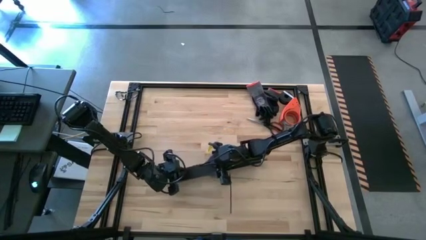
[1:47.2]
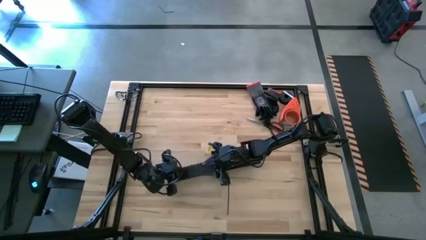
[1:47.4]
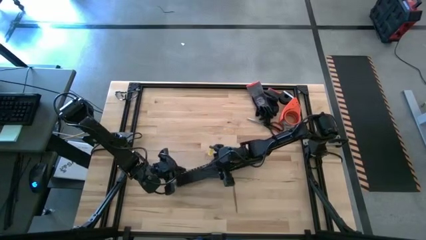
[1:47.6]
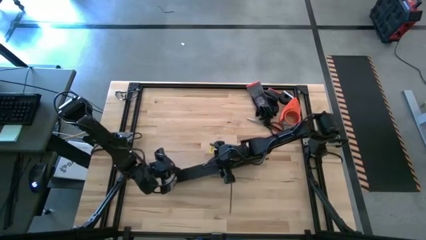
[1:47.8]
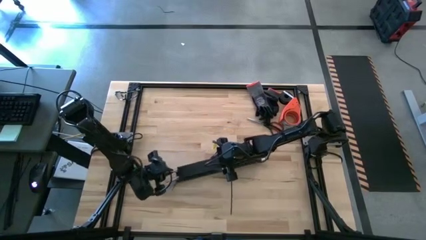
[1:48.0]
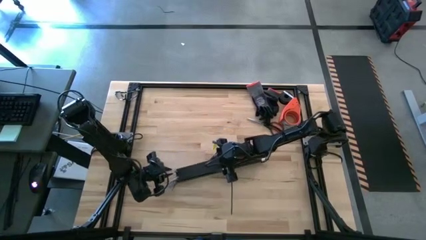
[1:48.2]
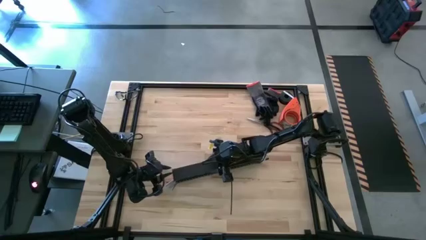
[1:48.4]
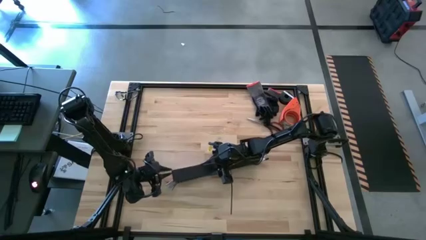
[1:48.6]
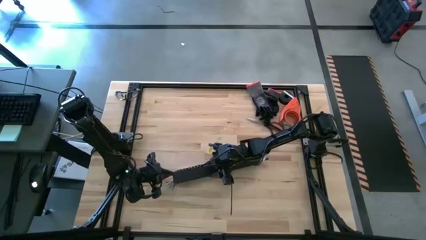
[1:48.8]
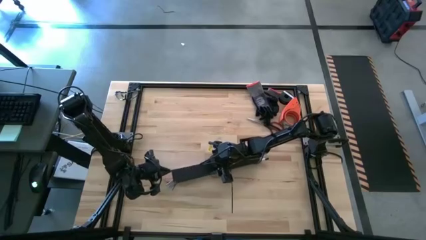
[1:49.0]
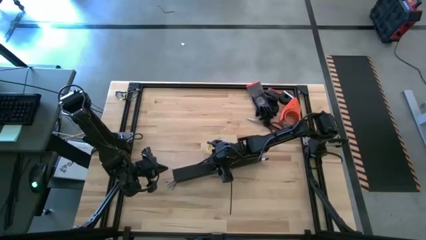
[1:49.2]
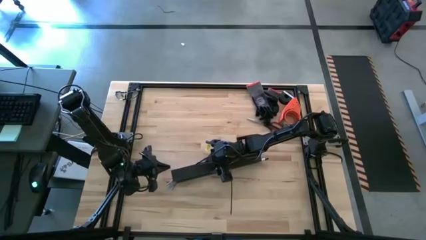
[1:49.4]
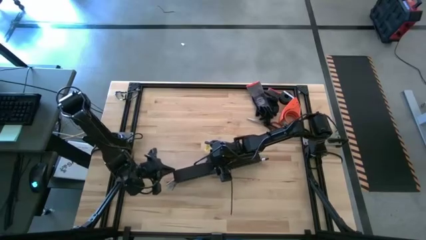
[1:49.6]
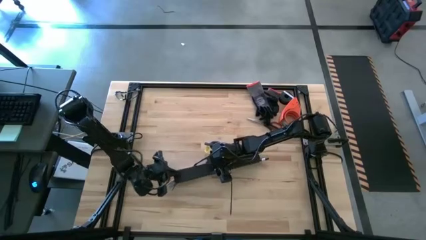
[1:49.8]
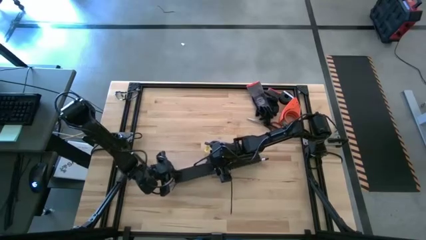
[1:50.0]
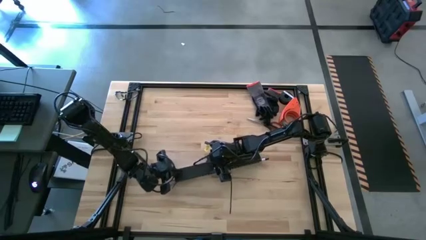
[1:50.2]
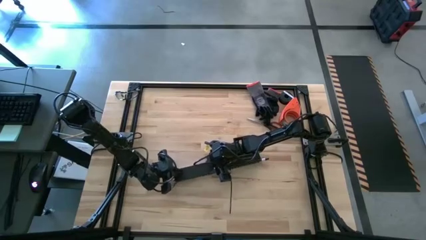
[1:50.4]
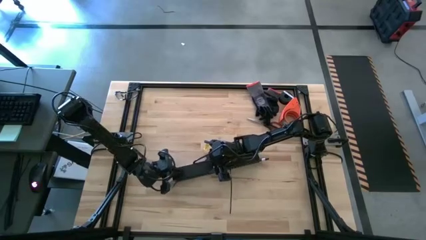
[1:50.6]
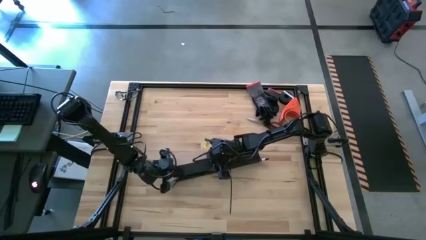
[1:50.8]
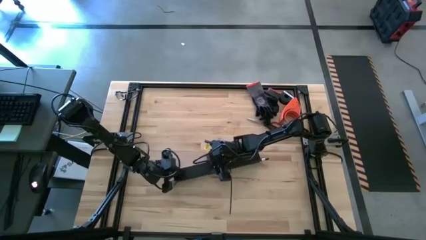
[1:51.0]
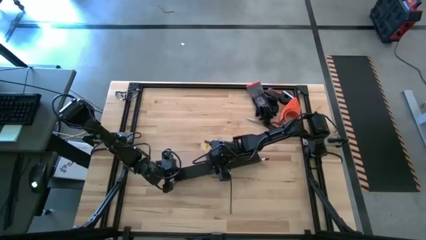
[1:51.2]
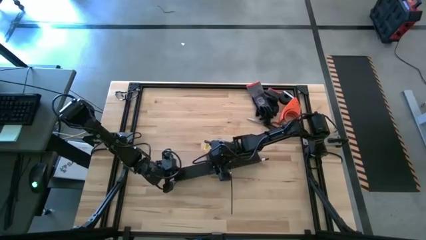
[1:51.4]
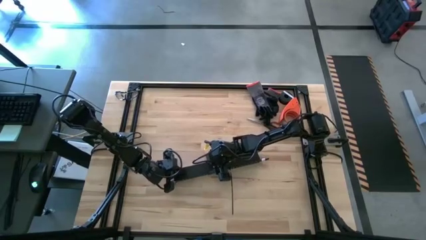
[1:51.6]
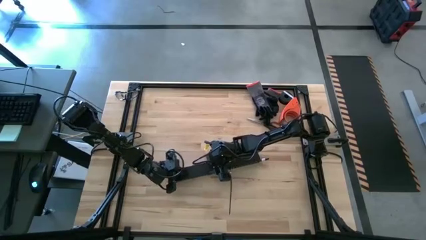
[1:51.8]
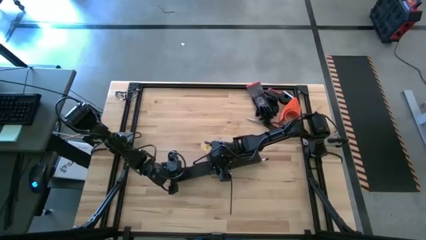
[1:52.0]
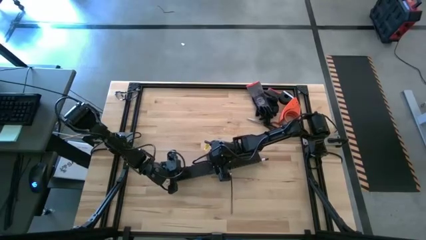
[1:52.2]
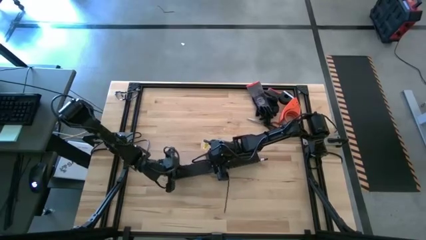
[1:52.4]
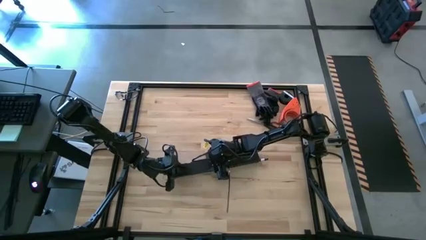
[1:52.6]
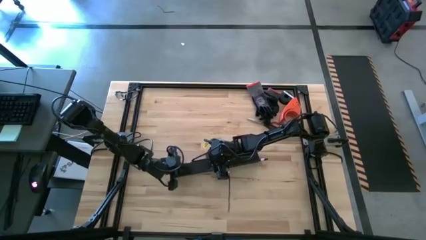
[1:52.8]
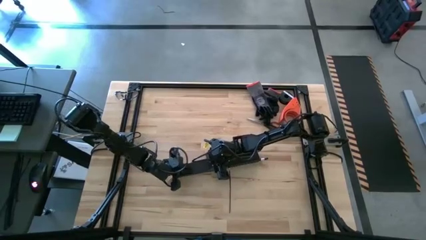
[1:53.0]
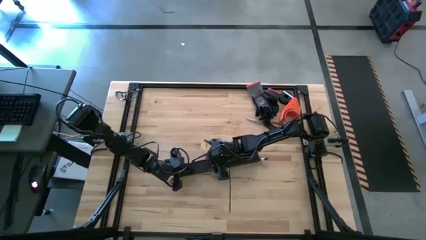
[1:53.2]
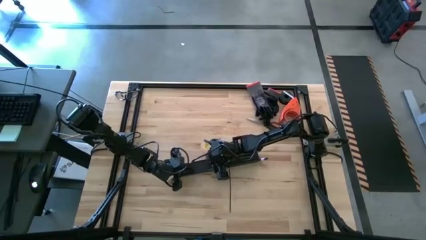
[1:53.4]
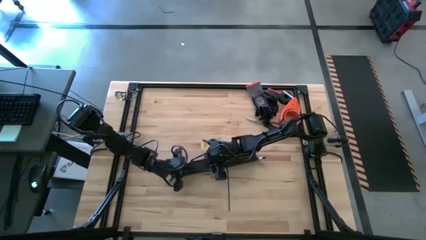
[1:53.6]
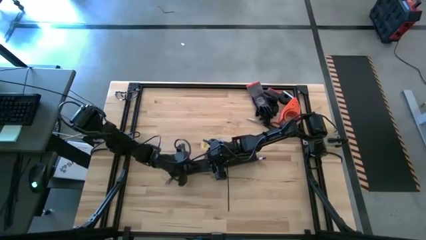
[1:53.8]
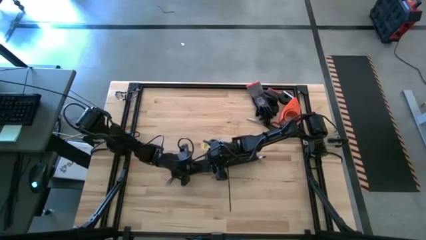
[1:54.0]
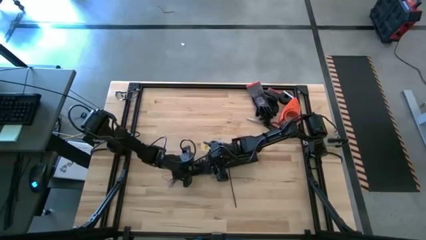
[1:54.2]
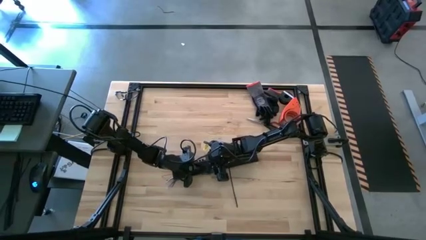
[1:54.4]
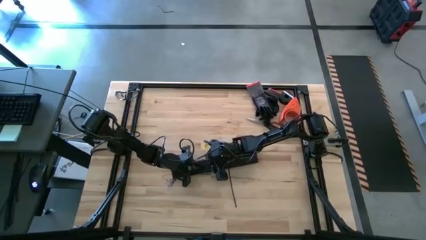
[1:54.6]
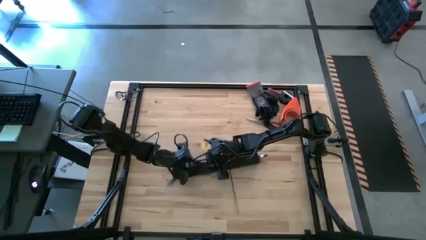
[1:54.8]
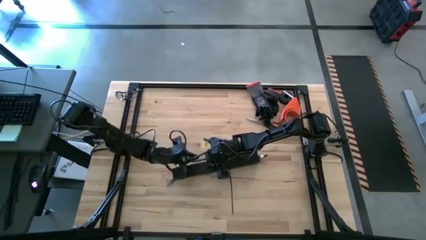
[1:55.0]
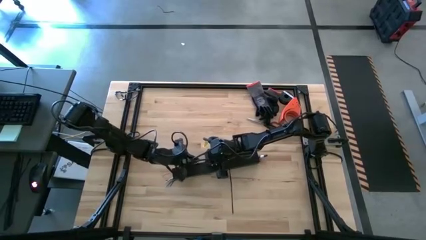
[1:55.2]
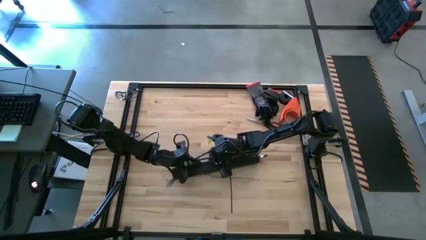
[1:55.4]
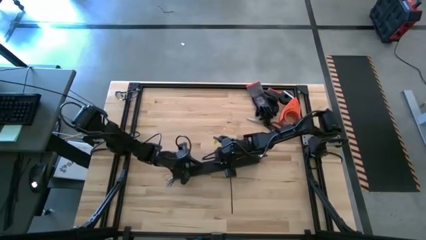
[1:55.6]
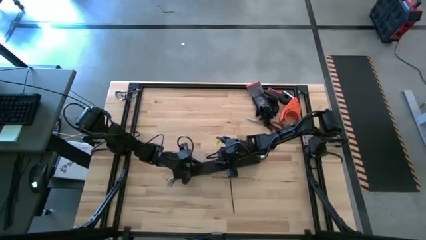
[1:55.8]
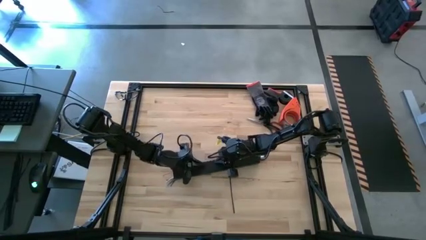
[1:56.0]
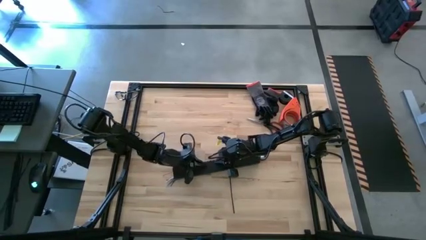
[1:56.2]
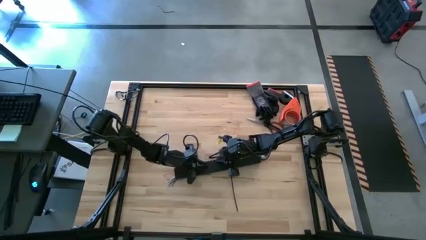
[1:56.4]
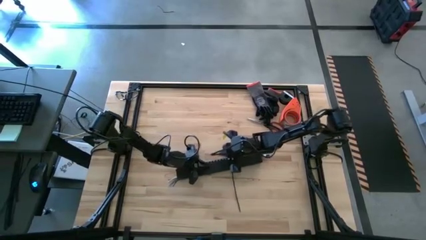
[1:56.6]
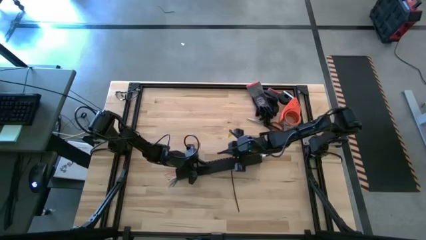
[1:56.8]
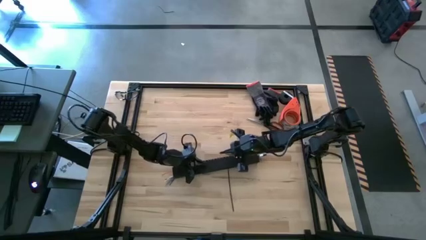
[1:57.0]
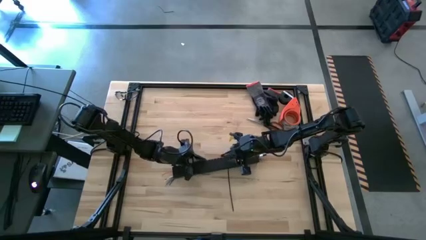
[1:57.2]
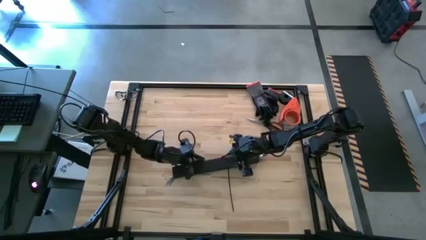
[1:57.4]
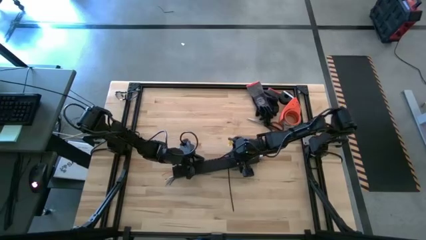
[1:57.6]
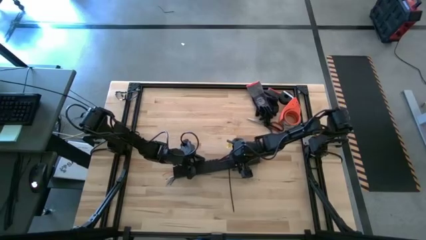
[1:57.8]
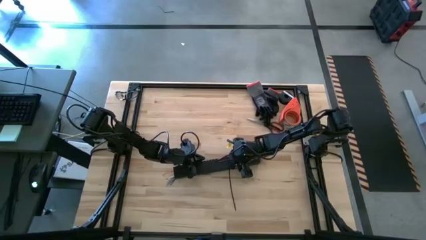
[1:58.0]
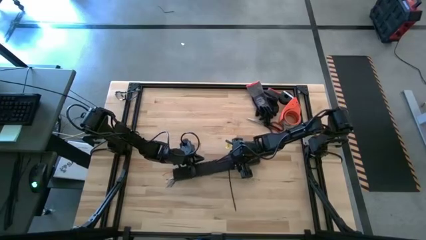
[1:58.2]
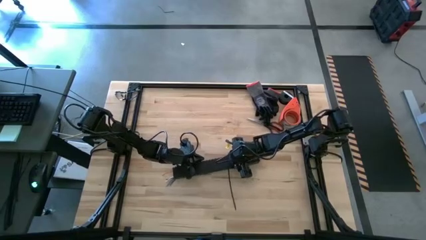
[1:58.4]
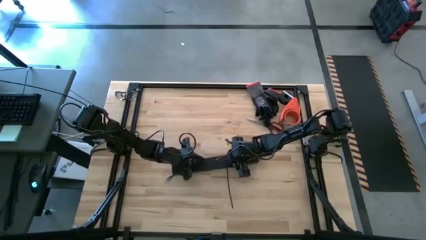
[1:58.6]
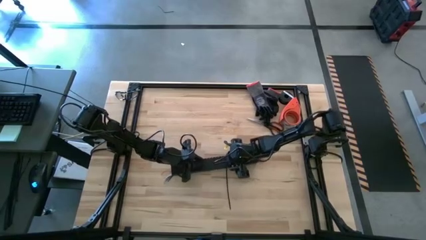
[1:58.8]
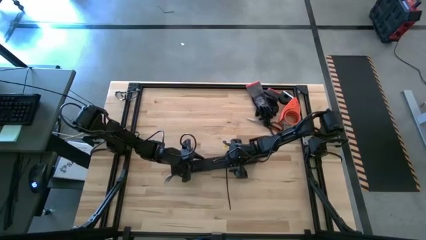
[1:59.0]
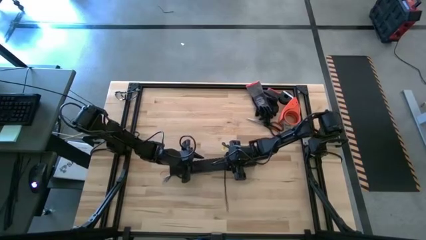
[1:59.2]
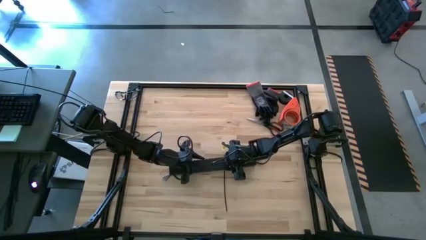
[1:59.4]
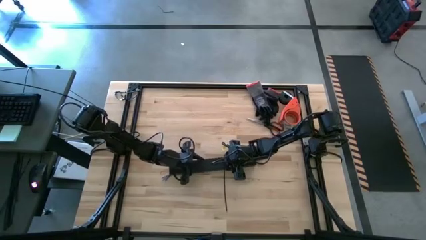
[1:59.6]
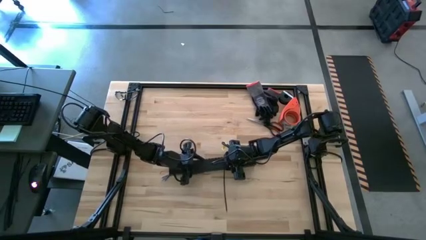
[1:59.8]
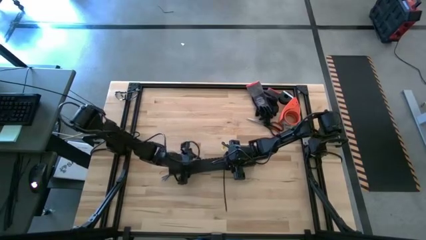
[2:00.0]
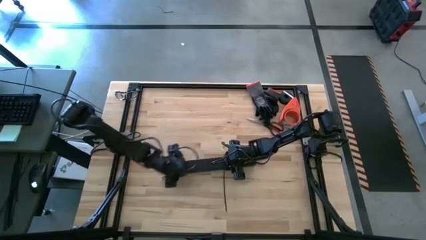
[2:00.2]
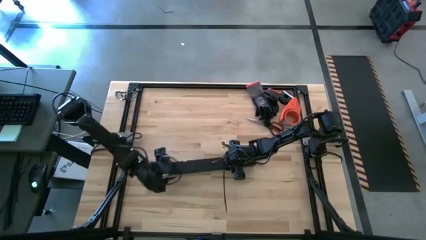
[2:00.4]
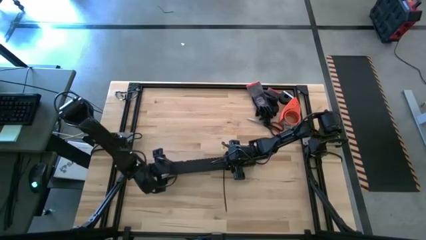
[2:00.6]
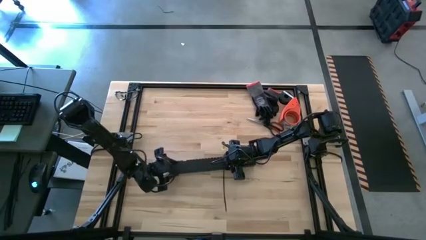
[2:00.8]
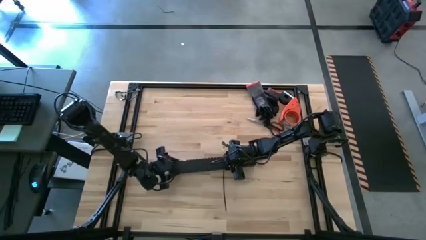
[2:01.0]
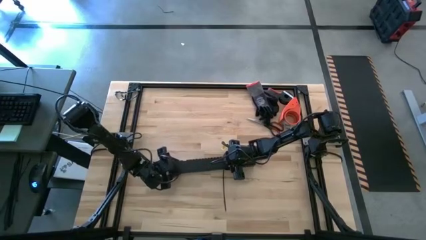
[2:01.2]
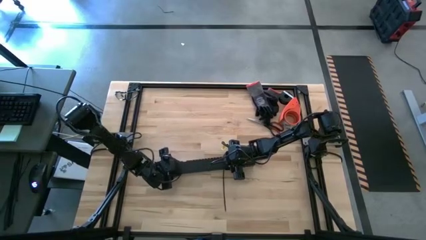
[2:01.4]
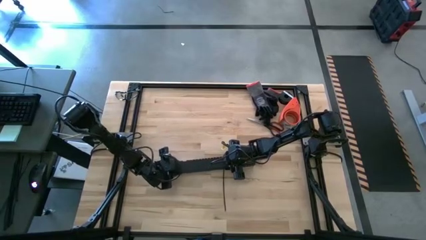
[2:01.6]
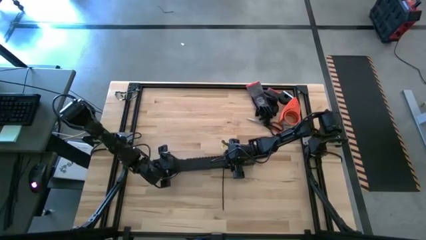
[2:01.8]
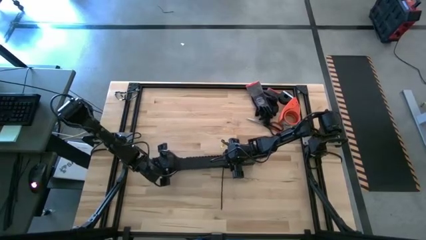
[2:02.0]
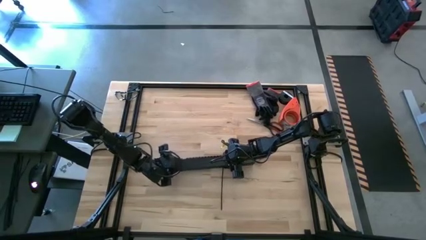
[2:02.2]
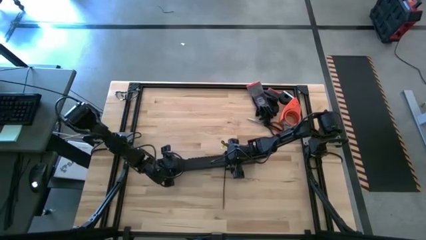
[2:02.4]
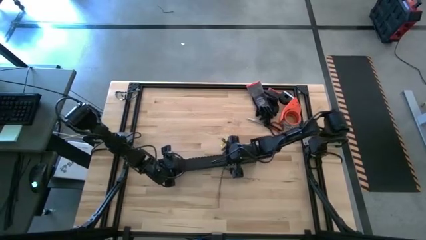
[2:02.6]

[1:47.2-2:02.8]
Task: Ziptie cables
Close the black cable duct
